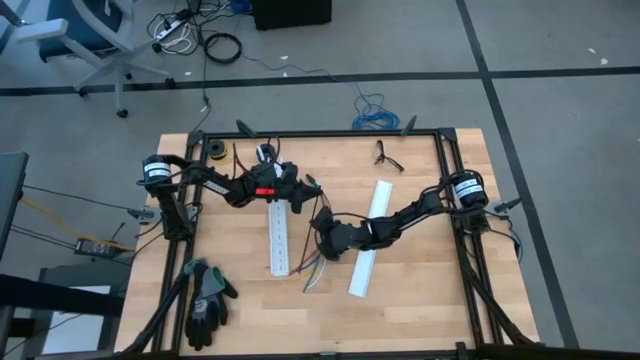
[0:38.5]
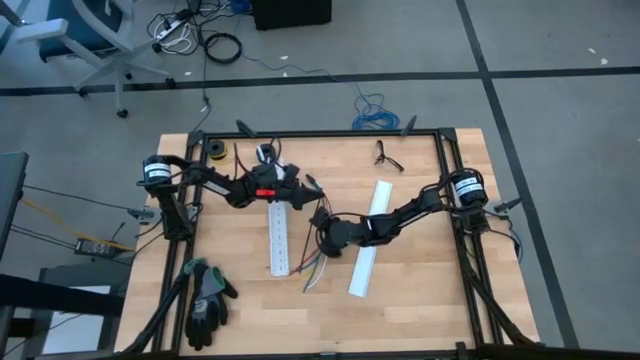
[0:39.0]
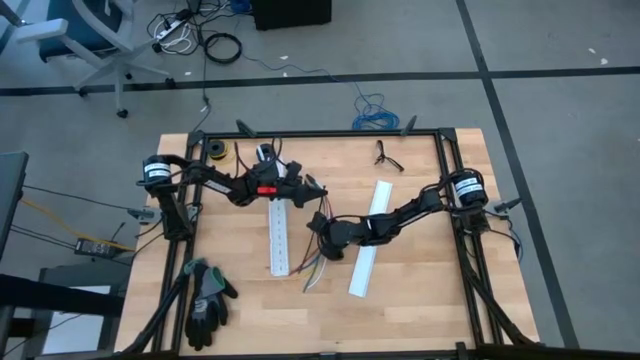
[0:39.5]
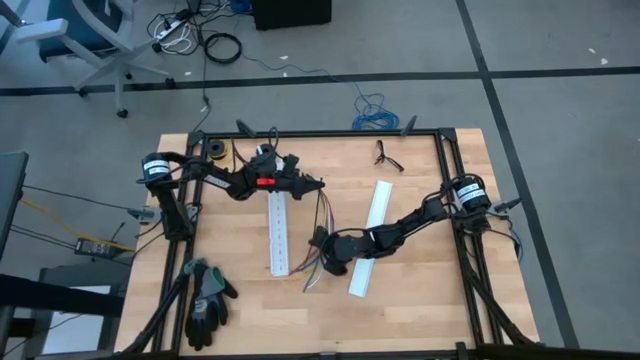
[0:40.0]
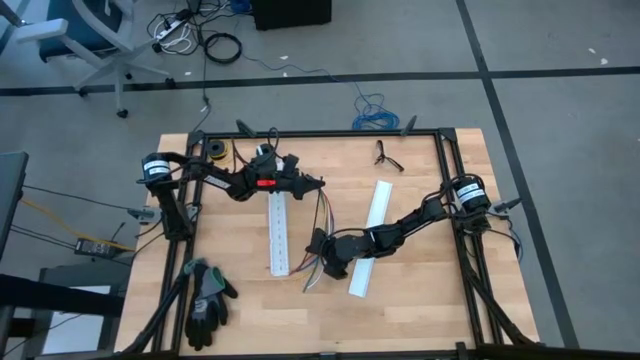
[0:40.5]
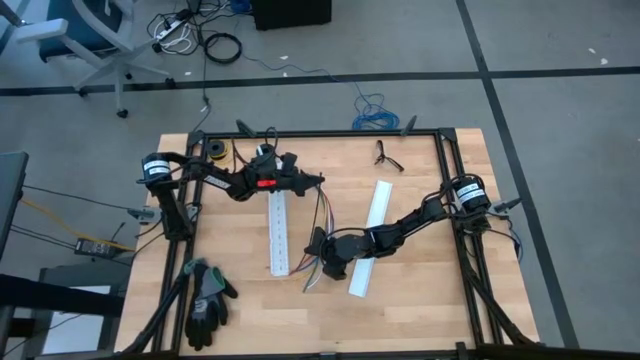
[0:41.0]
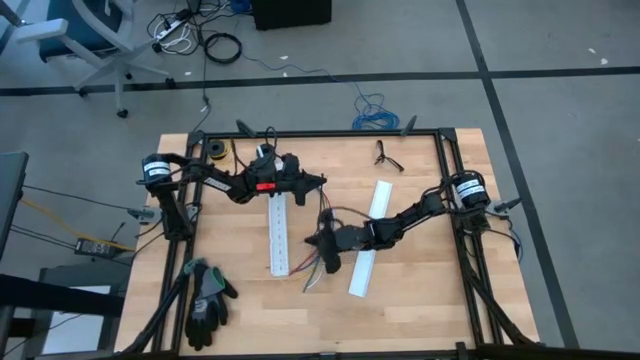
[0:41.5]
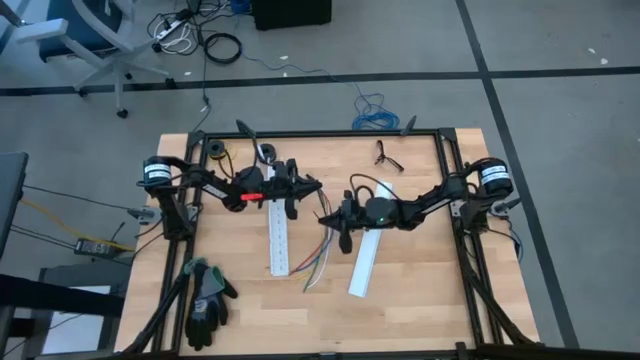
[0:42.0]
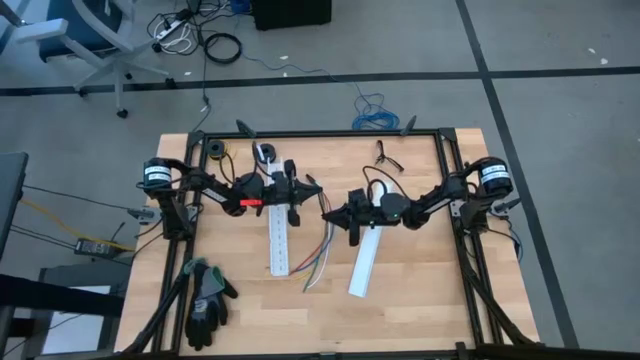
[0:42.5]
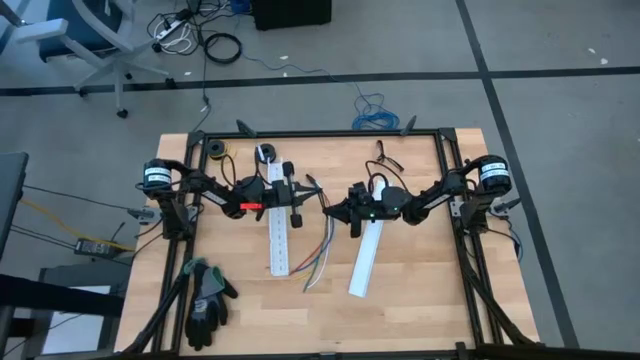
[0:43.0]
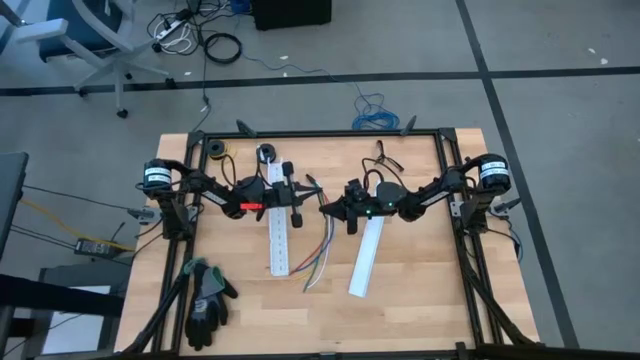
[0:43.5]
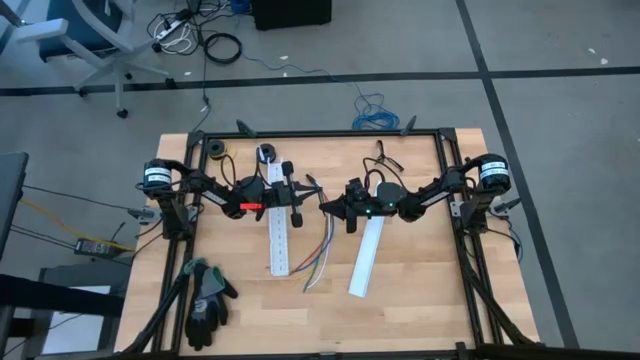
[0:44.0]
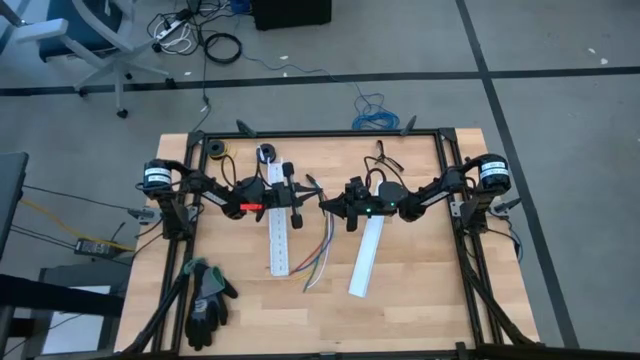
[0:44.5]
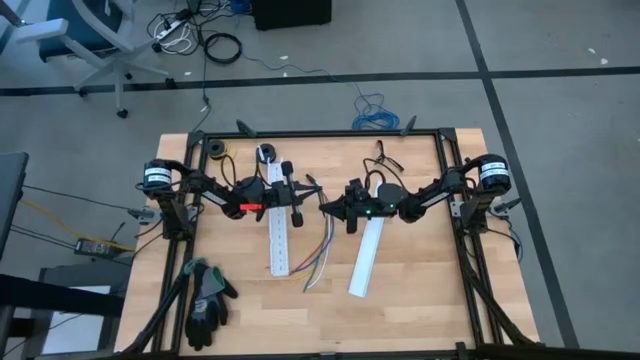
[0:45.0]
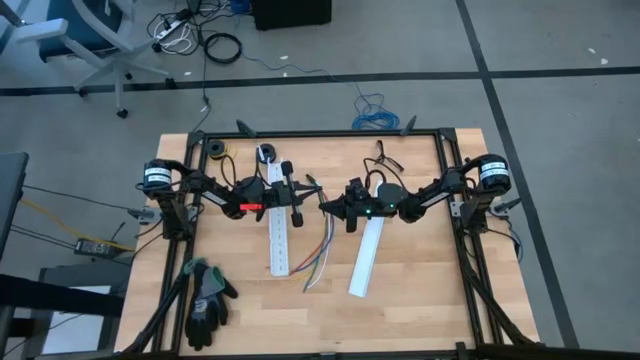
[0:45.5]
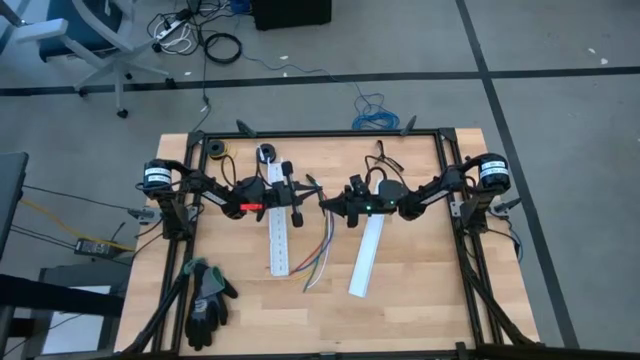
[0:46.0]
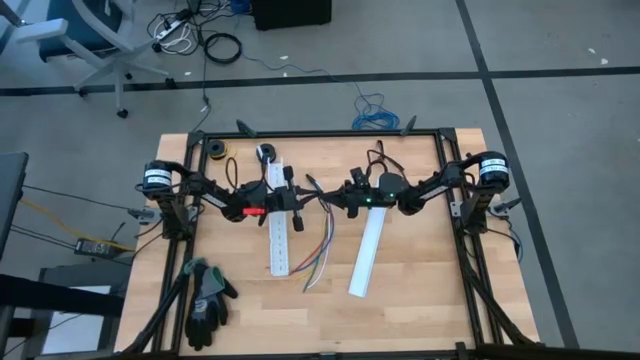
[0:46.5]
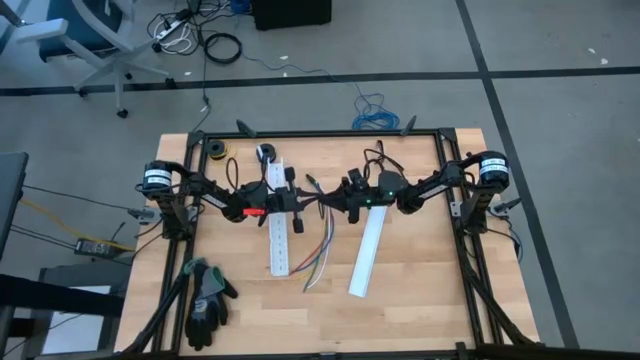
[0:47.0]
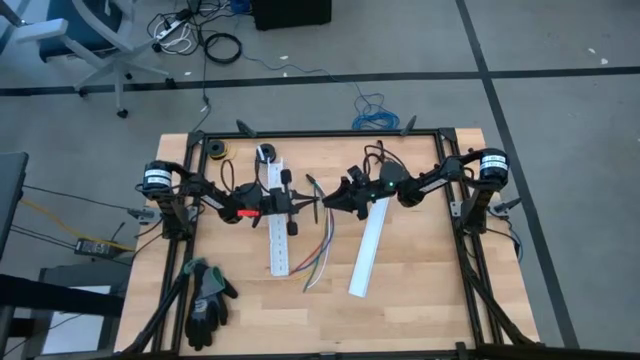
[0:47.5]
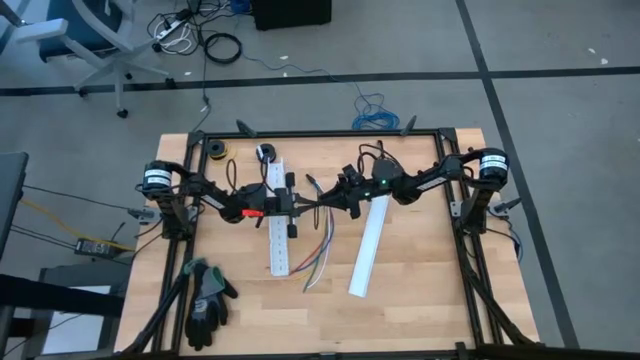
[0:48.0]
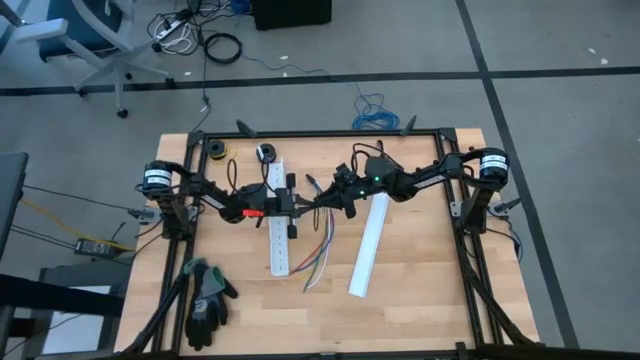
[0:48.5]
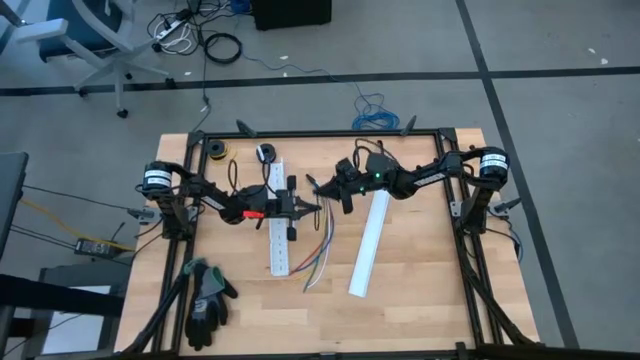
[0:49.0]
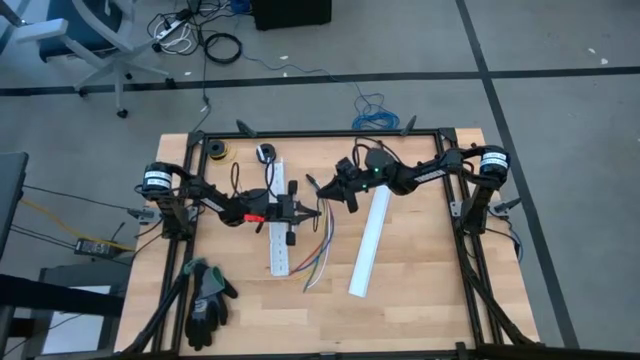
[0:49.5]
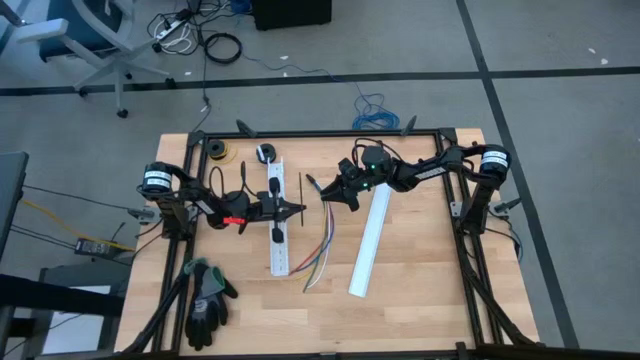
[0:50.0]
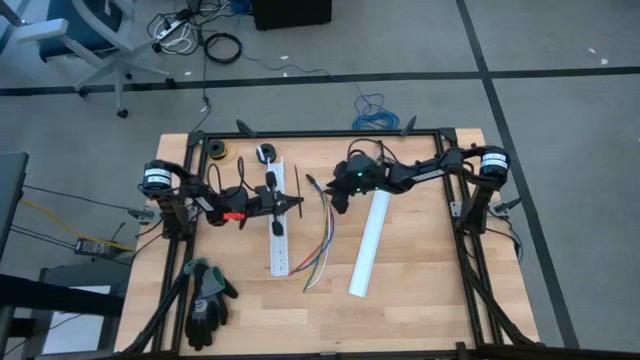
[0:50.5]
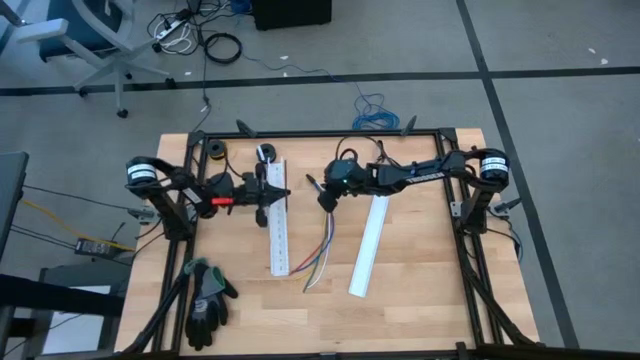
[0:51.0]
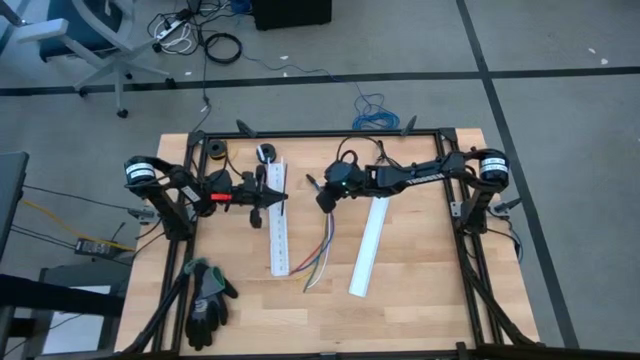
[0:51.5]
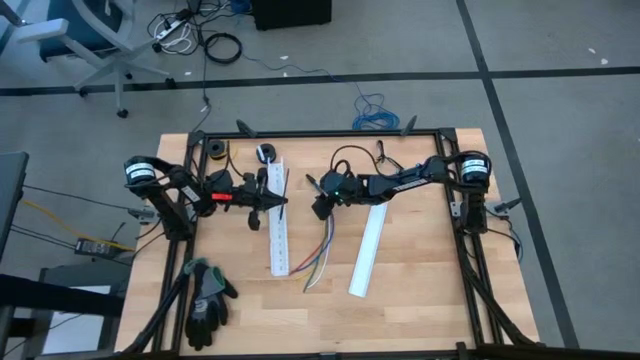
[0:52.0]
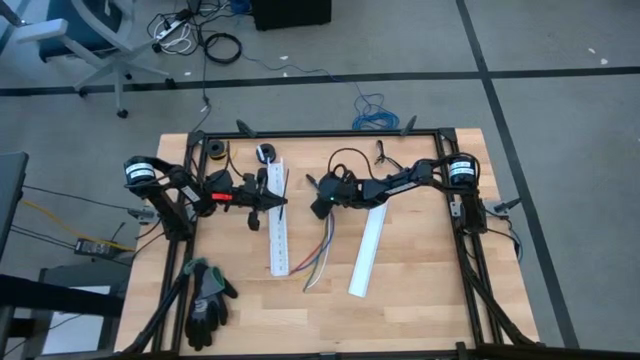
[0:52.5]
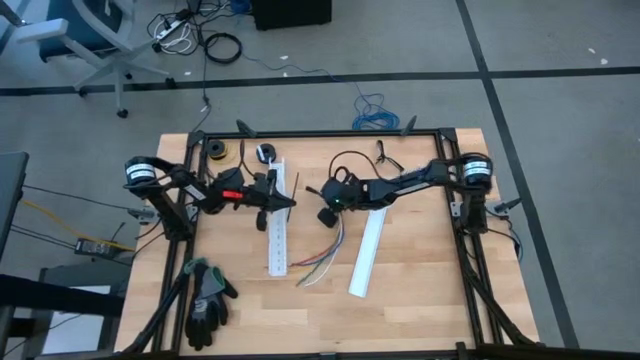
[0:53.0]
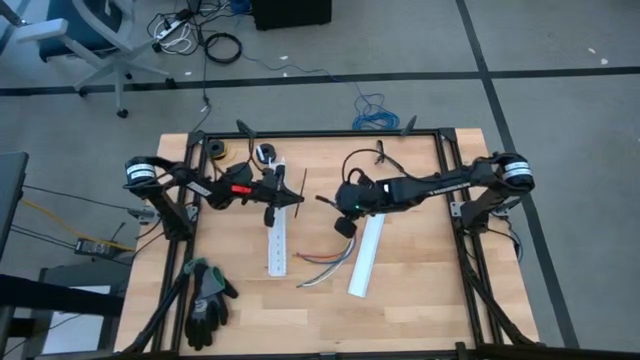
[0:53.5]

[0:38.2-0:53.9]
Task: Ziptie cables
Wrap the zip tie into the cable wires

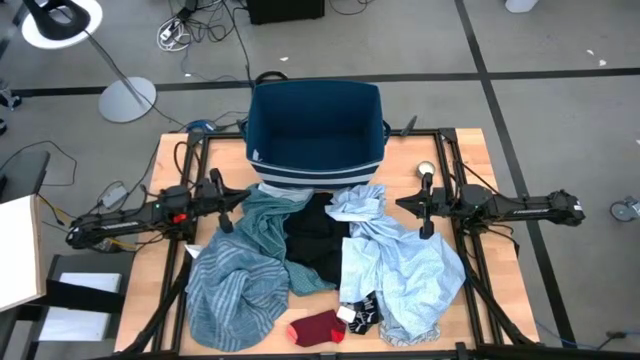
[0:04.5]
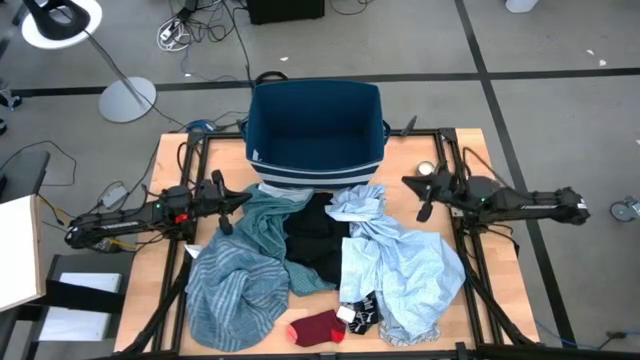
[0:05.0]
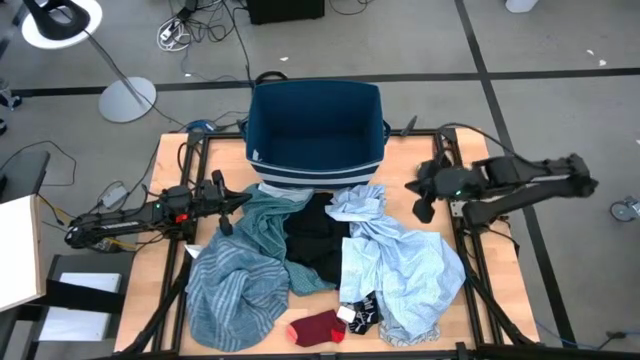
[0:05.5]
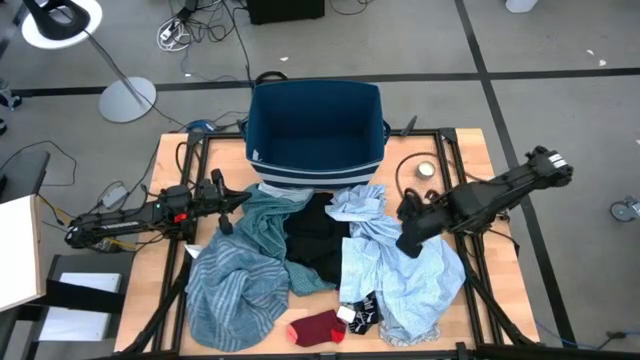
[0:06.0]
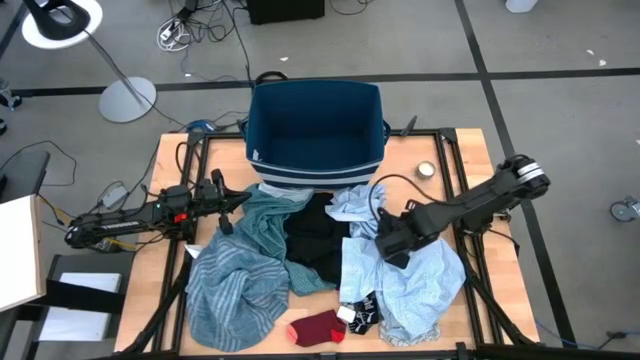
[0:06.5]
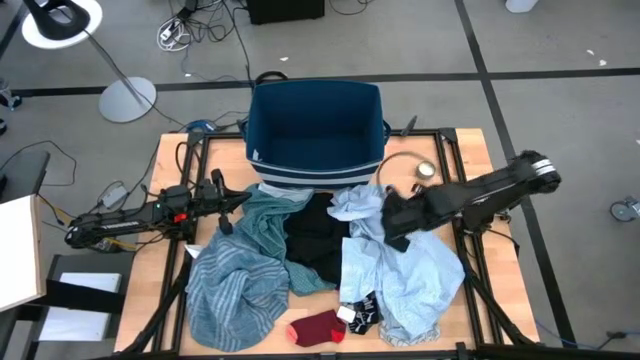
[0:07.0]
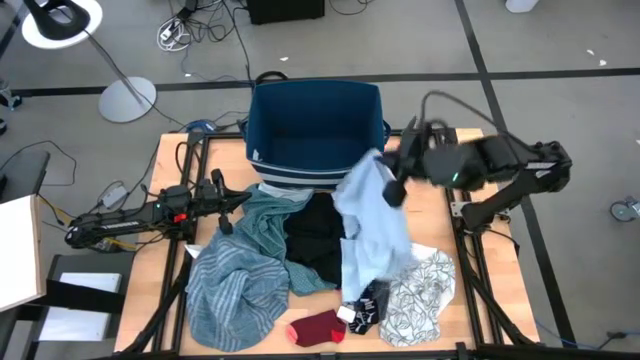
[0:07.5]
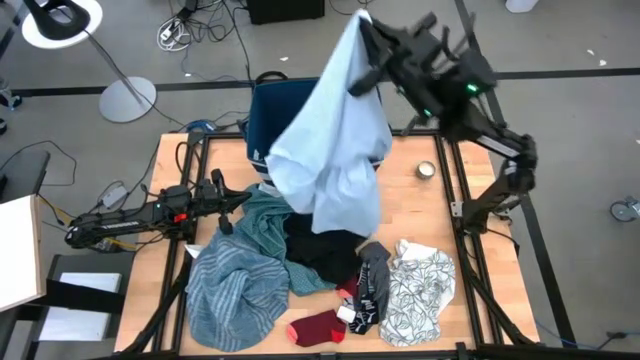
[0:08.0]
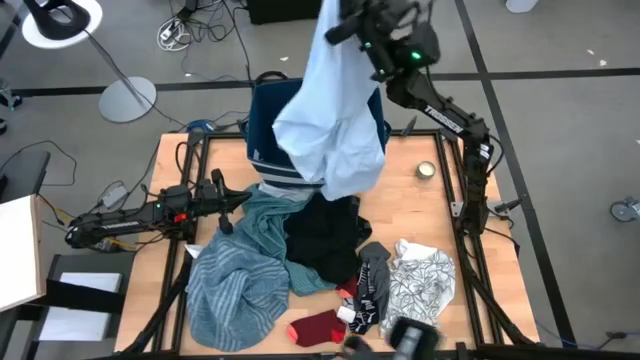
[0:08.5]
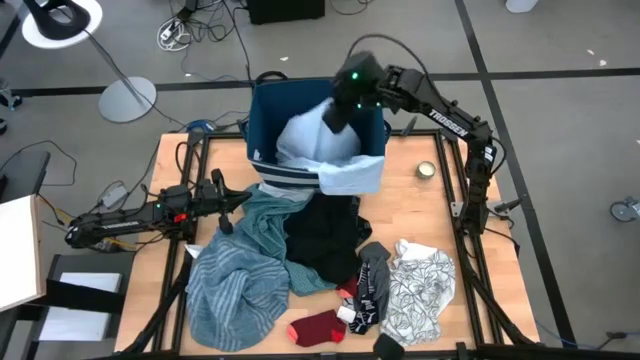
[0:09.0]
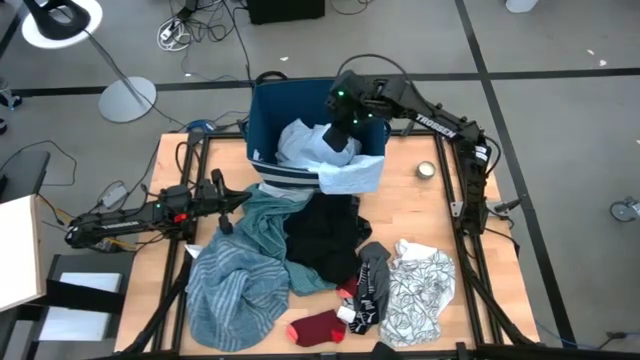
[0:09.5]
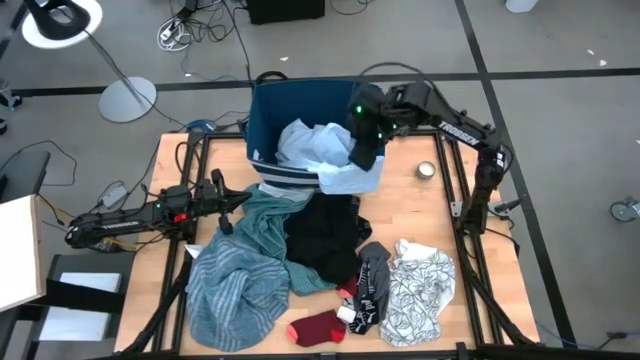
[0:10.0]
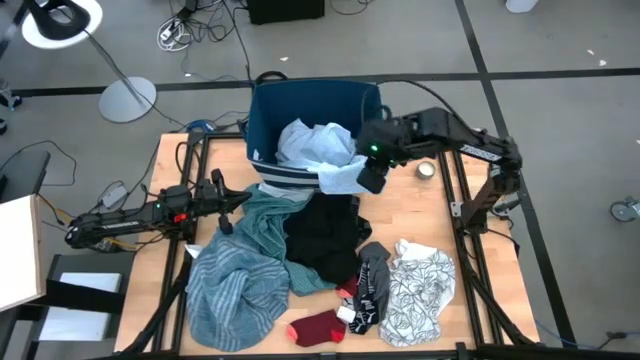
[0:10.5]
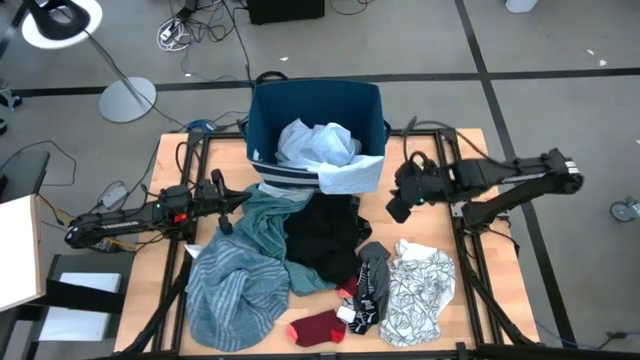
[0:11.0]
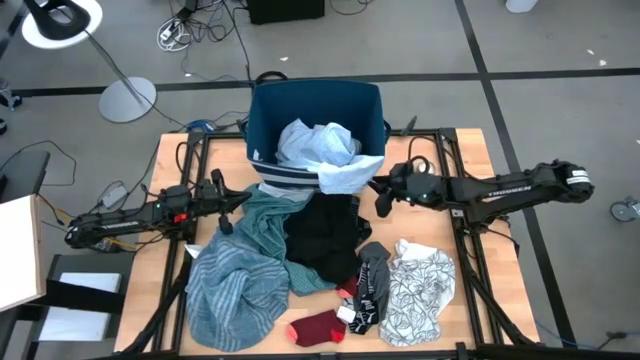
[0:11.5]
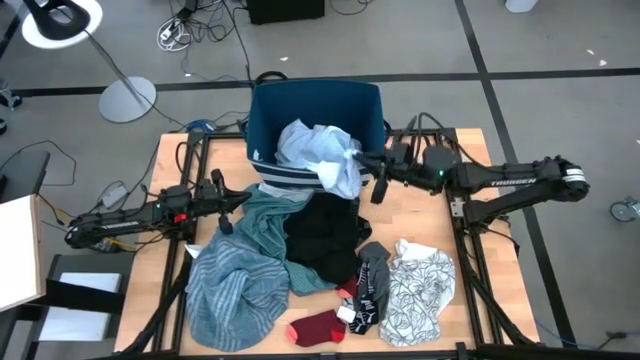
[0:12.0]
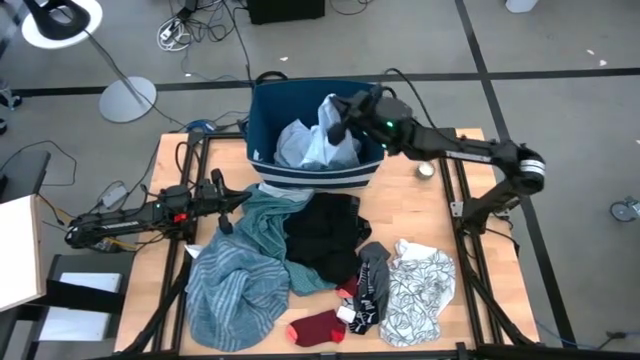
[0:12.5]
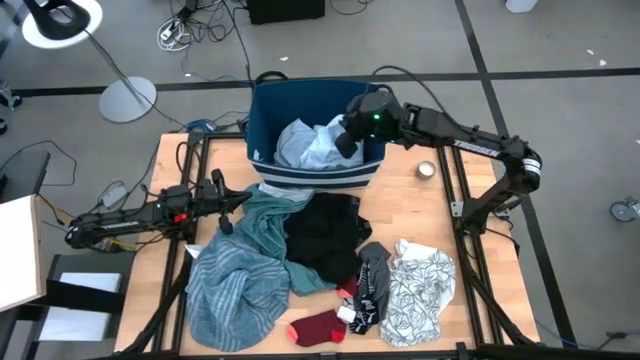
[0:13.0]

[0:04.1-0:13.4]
Task: Sort clothes
Put the light blue shirt into the blue laundry bin
